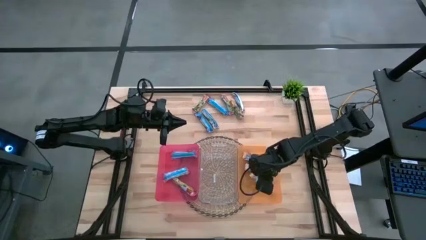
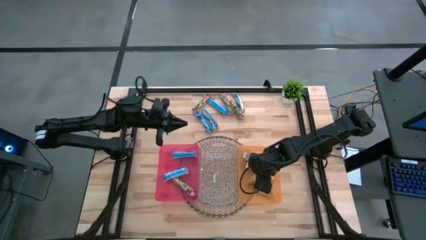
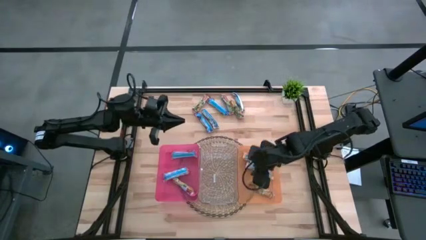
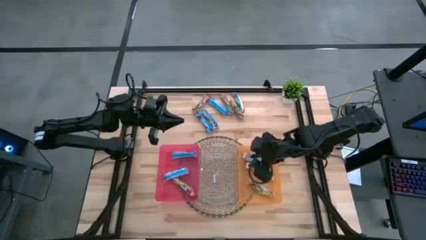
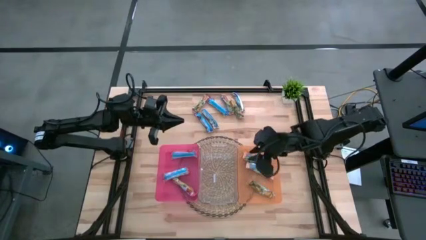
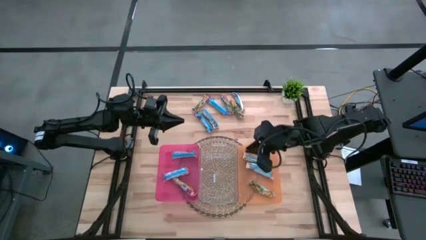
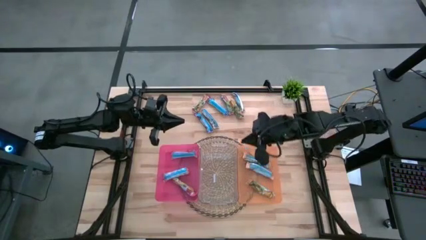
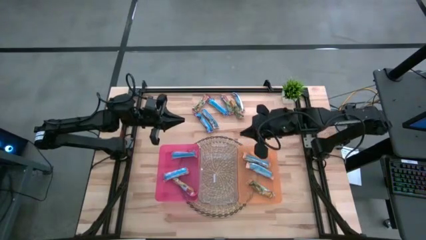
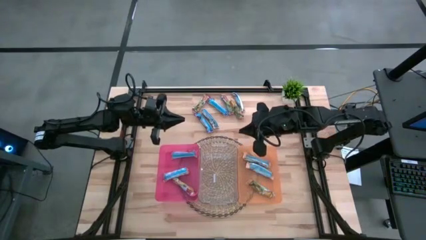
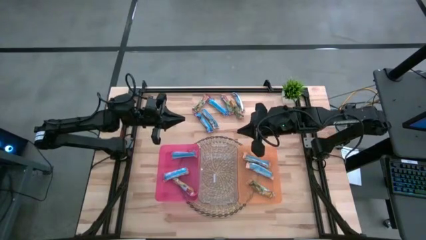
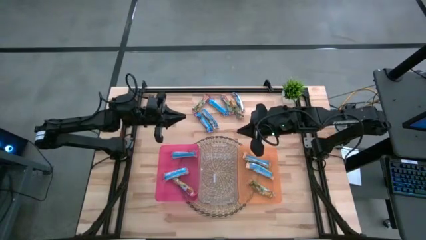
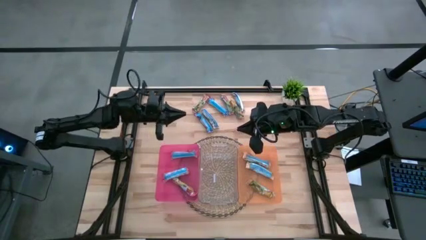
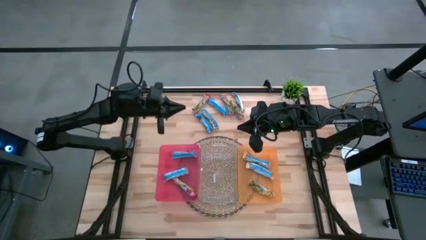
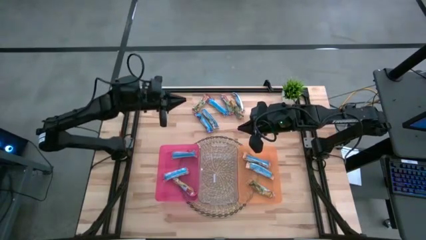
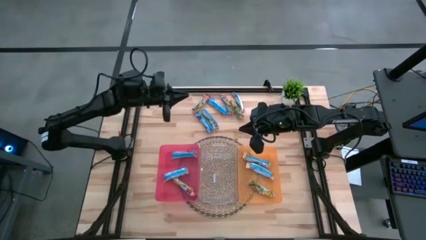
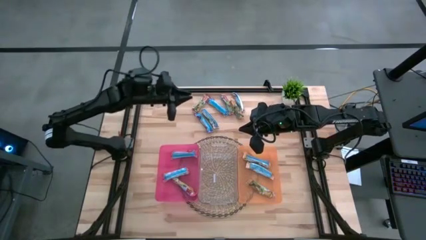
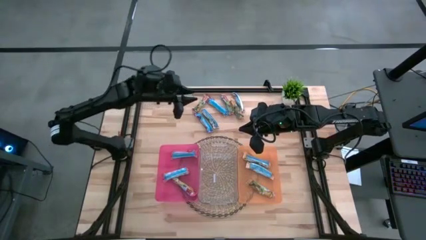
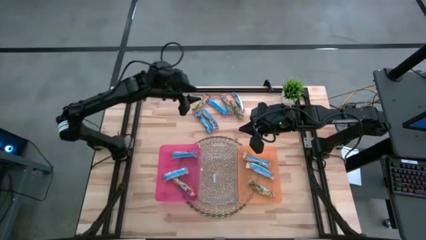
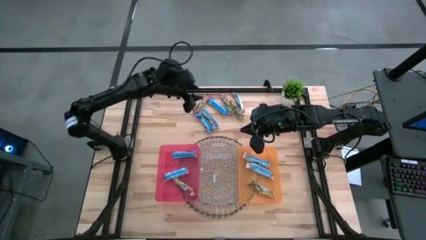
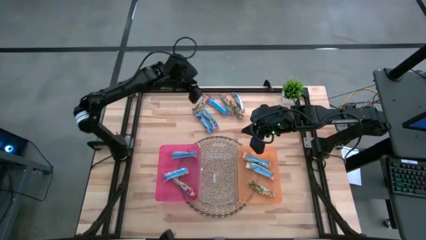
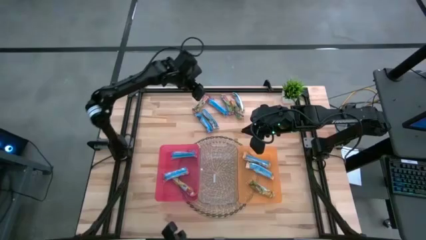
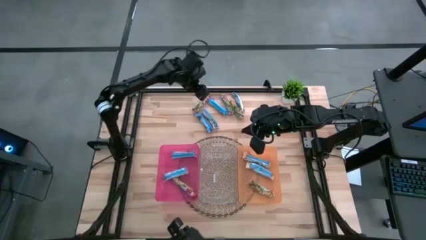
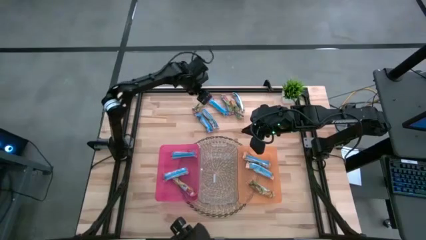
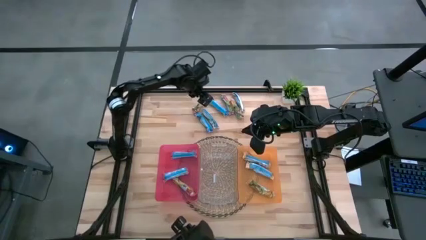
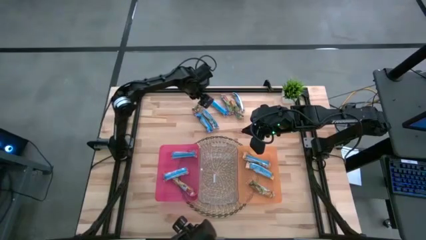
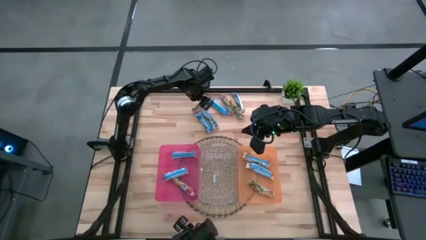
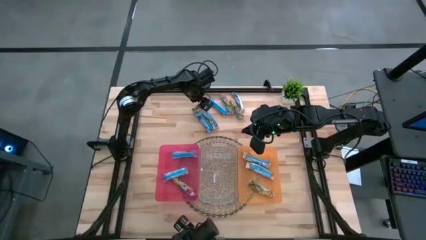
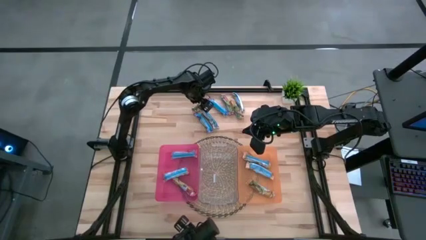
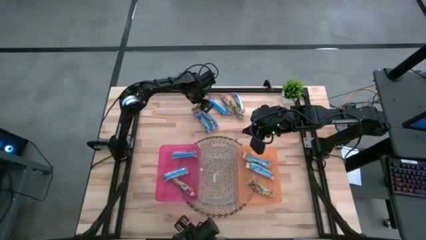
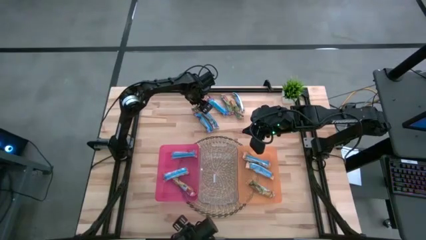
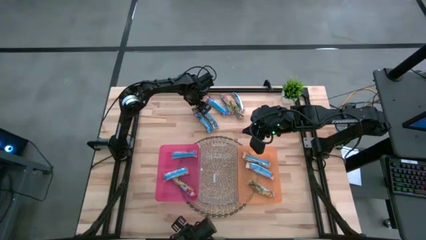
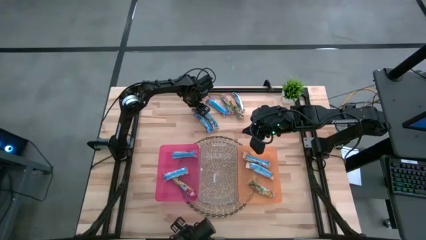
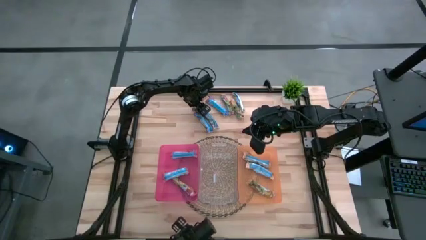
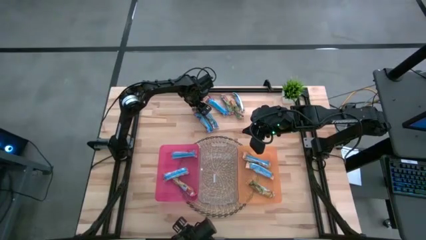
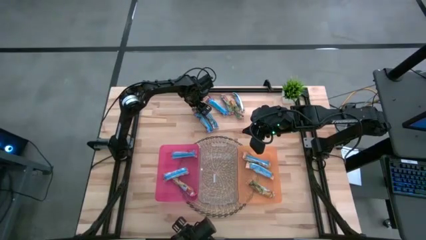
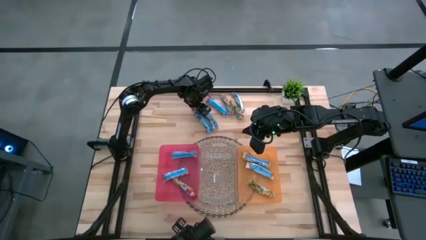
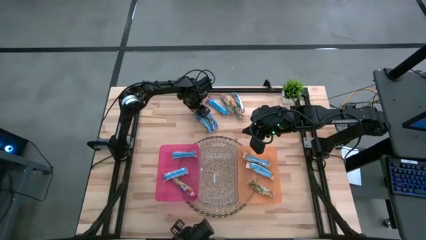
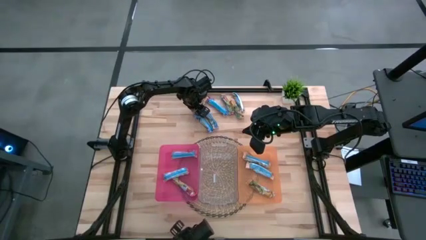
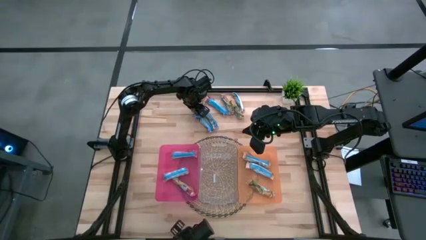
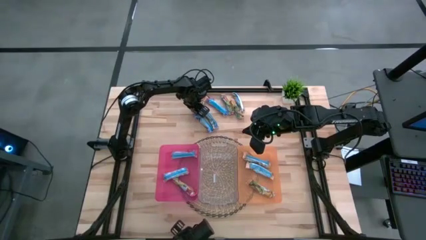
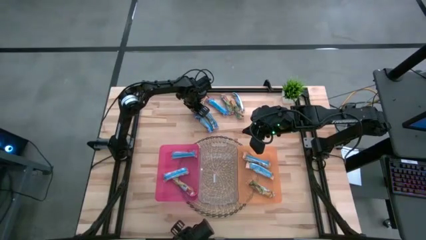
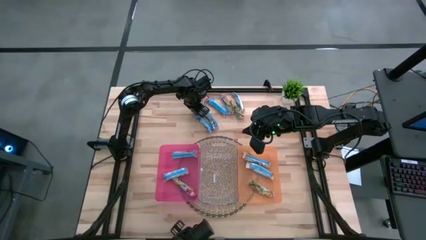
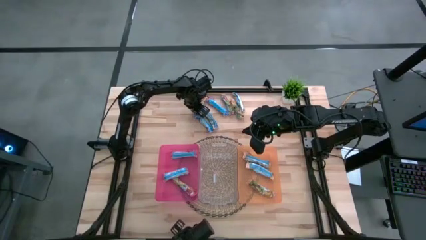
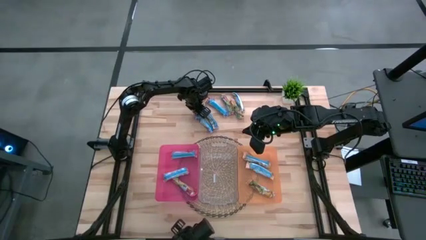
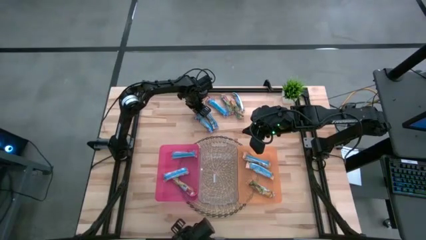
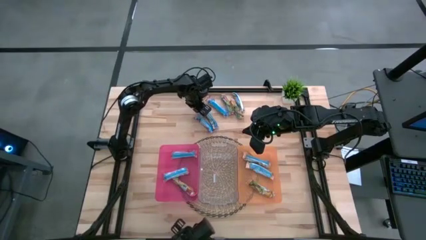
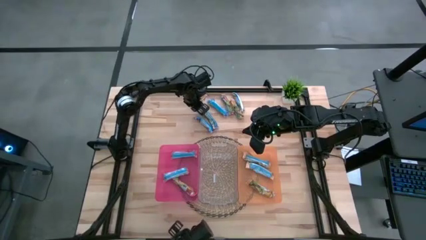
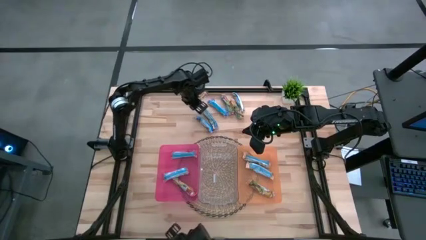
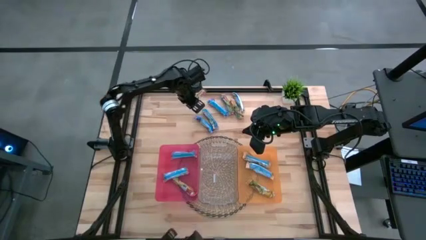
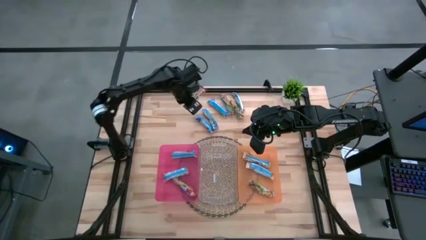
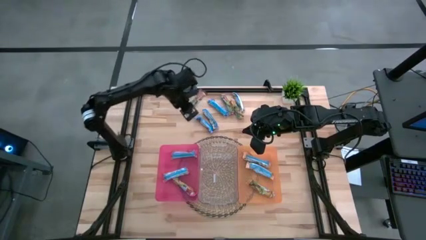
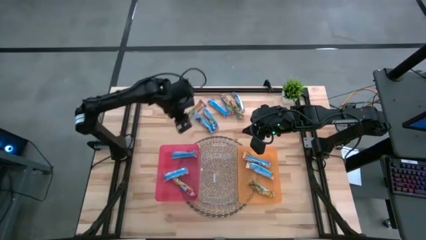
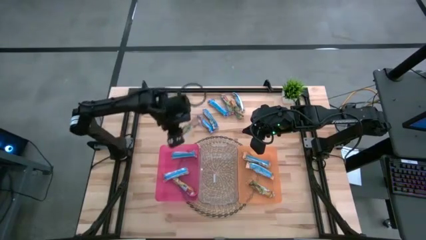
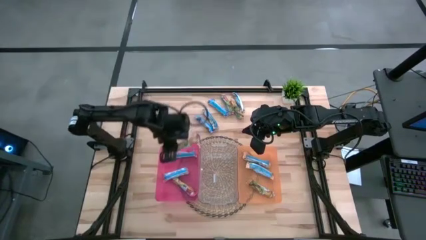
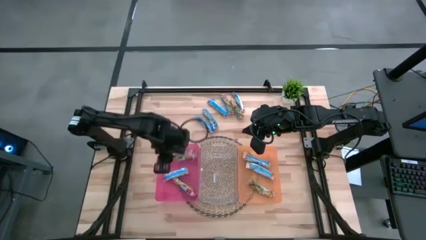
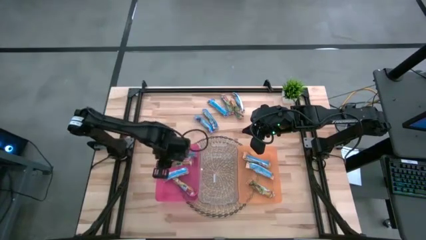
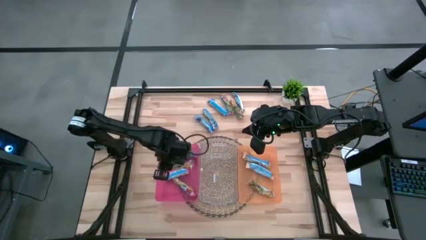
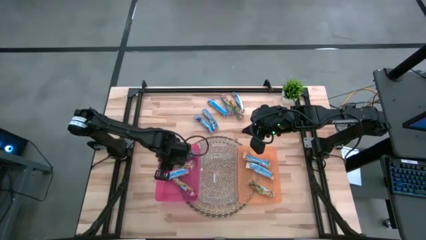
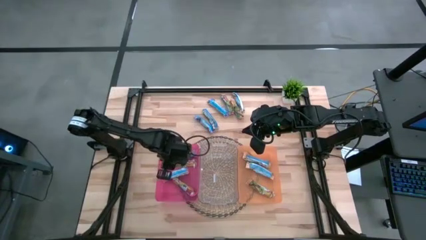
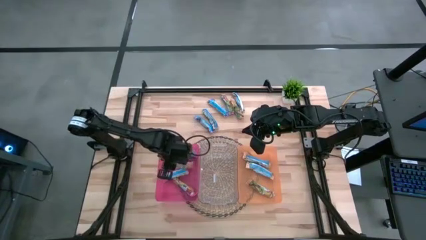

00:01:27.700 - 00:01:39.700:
Task: Pick and place Granola Bars by type
Put the red granola bar into the pink bin
